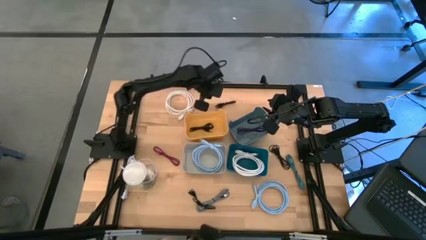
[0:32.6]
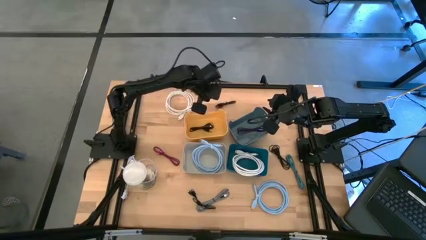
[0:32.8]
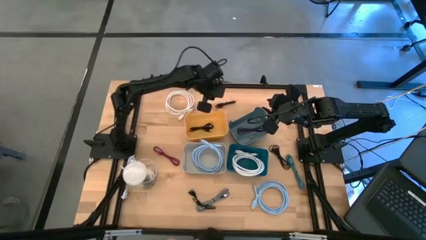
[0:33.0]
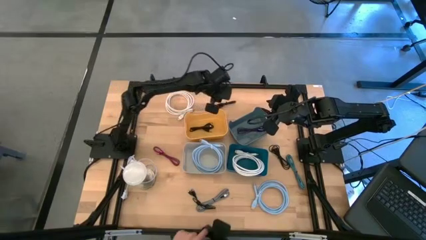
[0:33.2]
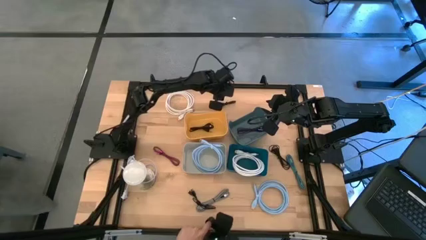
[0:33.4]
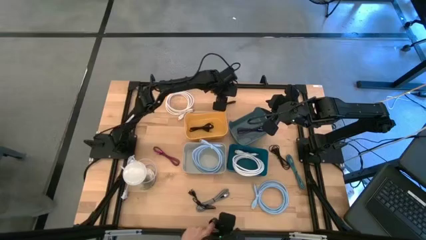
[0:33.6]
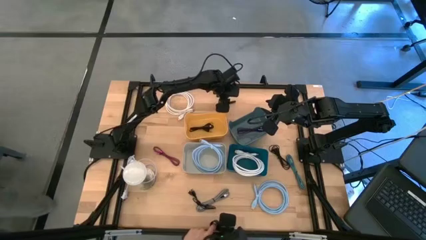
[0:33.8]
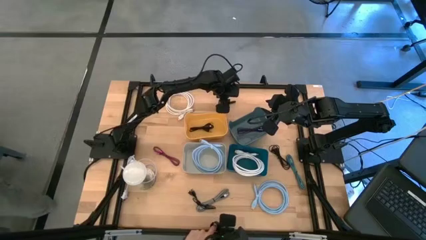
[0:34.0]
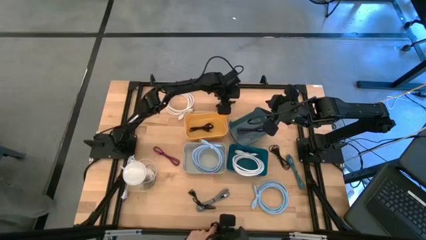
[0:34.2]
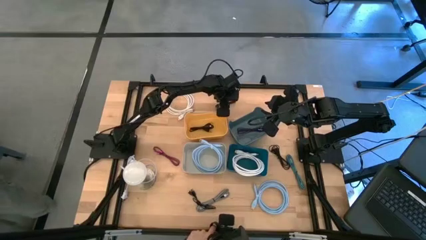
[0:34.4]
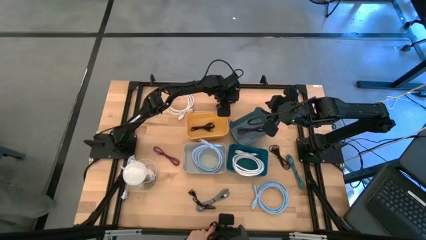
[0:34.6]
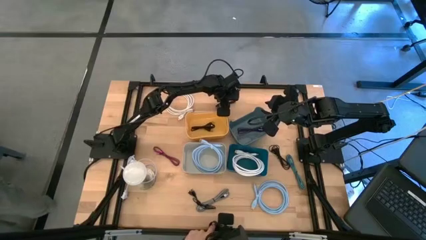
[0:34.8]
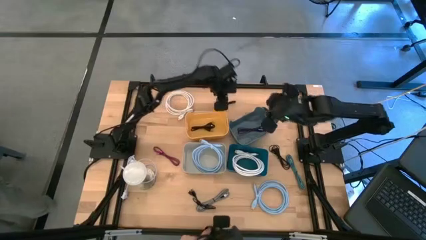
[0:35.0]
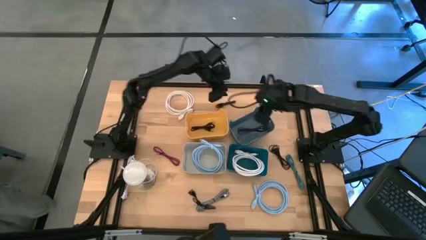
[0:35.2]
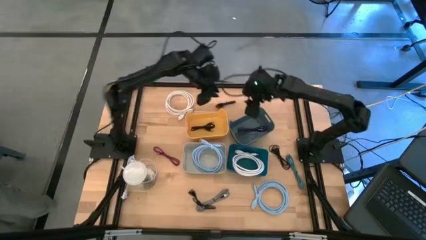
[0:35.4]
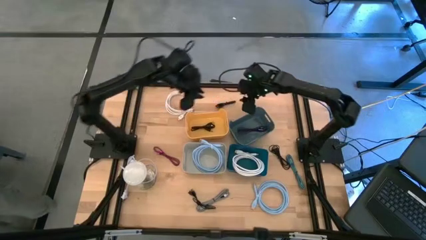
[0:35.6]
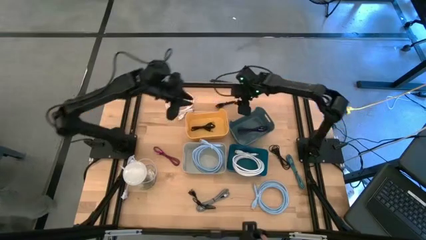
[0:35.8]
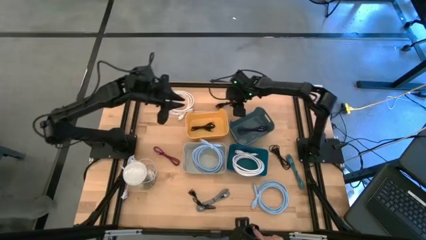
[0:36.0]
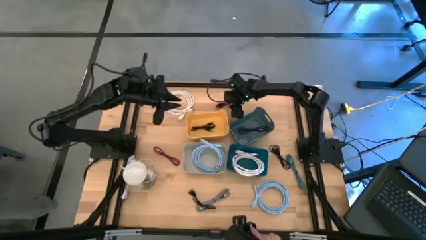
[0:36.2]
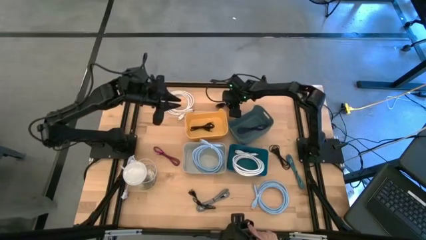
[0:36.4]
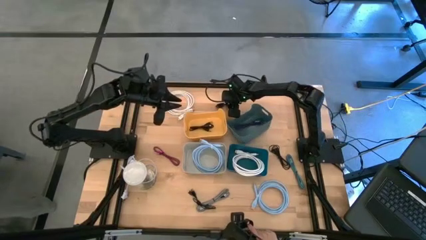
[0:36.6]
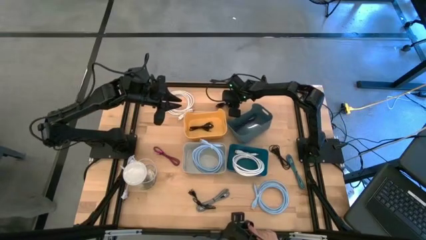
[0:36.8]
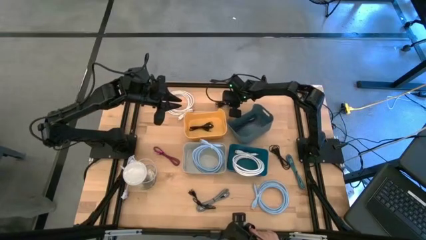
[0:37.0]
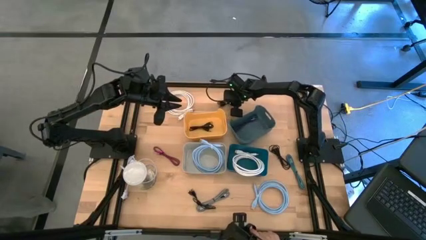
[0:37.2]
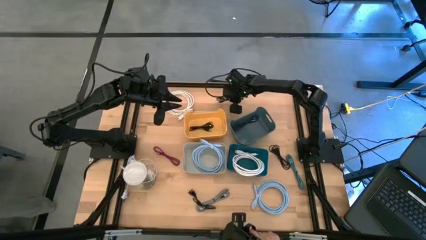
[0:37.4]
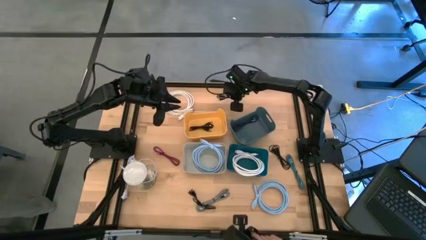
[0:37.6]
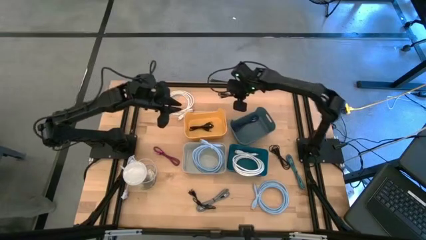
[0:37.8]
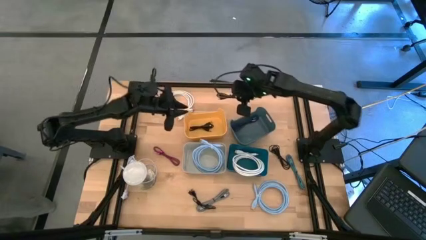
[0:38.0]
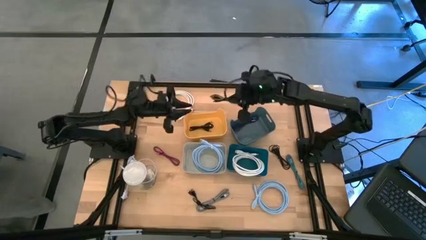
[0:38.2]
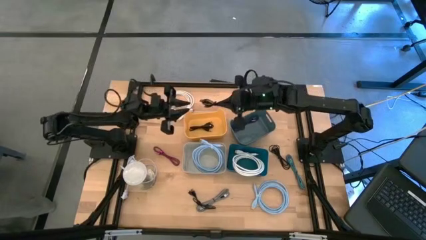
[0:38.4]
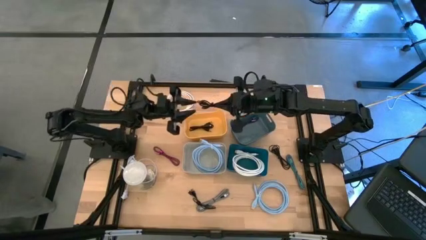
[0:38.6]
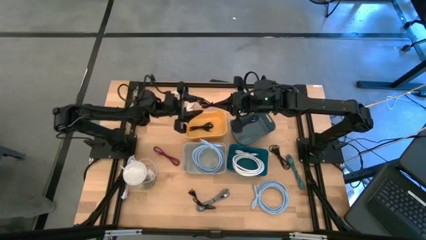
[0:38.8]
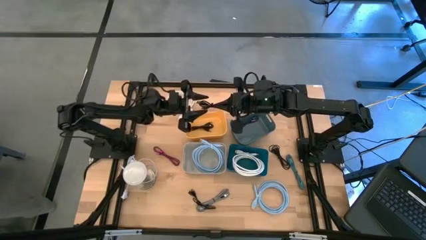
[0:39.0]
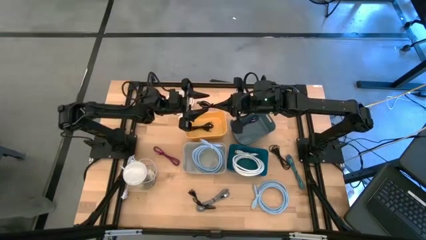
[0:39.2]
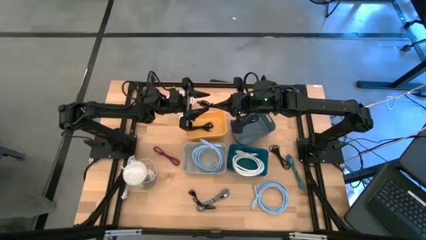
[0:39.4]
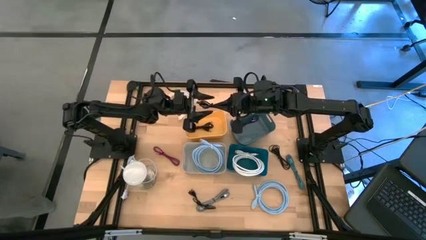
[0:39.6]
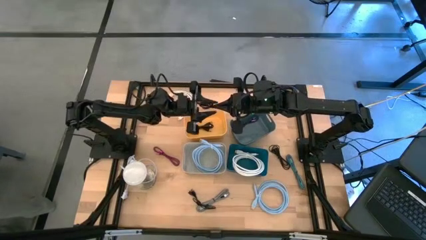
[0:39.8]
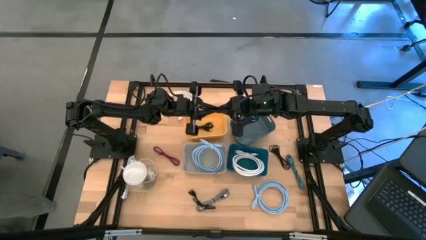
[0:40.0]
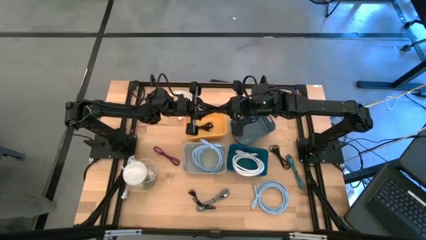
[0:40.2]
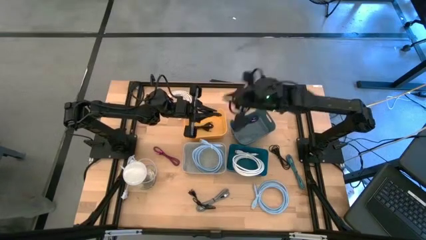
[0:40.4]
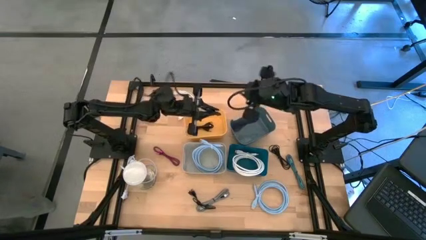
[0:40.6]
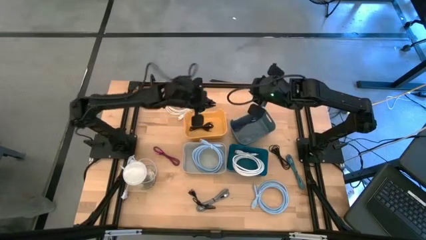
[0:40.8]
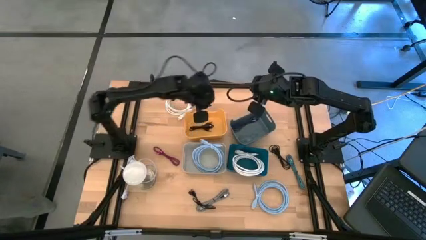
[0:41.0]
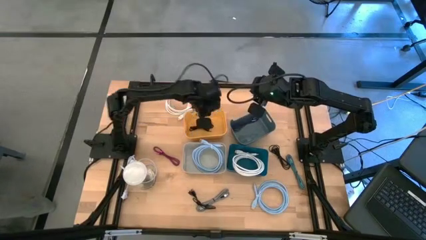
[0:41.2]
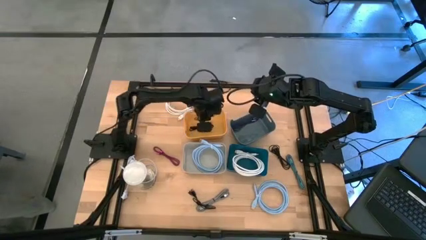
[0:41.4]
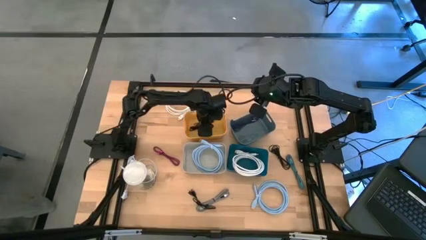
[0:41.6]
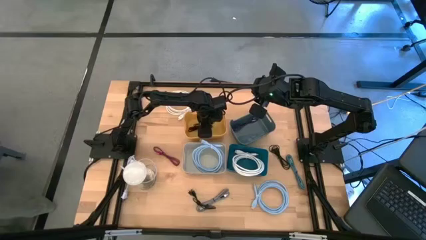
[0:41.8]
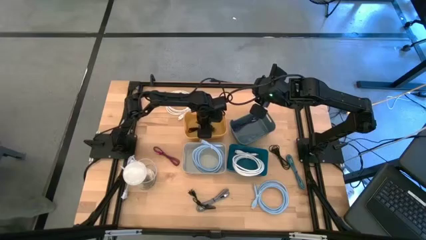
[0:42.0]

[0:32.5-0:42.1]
Task: Pick & Place USB Port
Put the black USB cable into the yellow bin

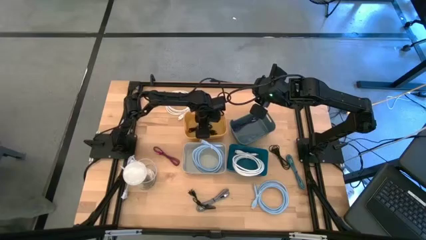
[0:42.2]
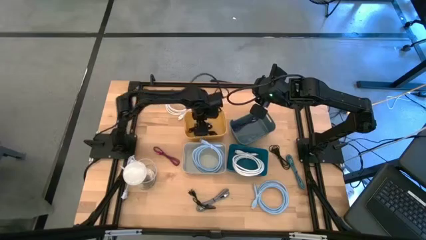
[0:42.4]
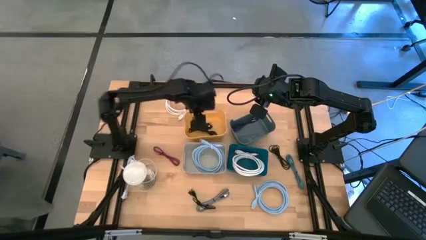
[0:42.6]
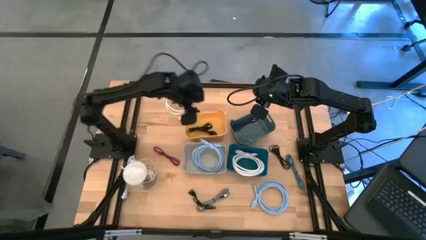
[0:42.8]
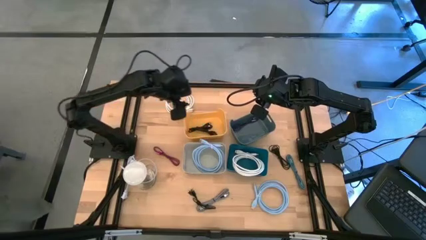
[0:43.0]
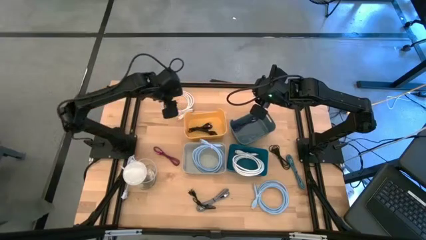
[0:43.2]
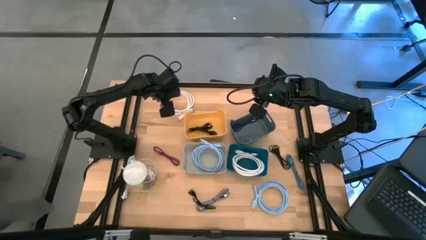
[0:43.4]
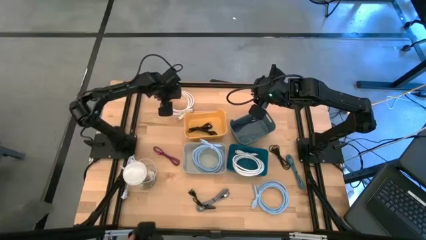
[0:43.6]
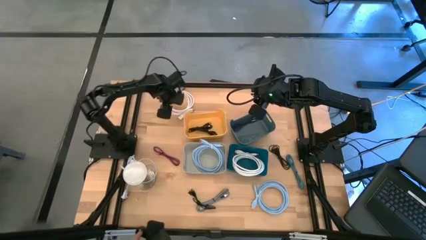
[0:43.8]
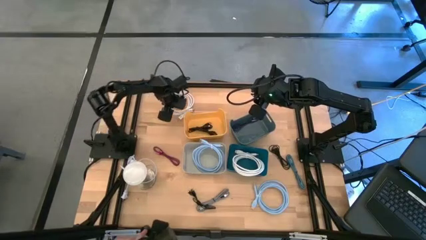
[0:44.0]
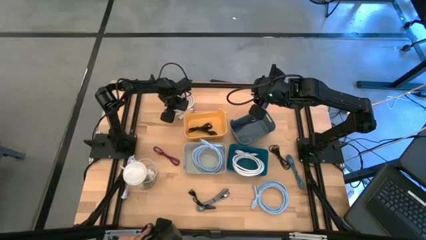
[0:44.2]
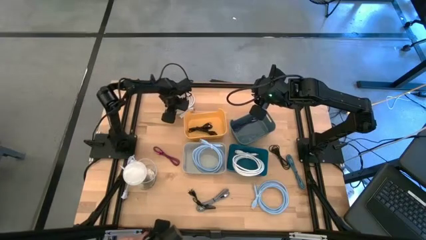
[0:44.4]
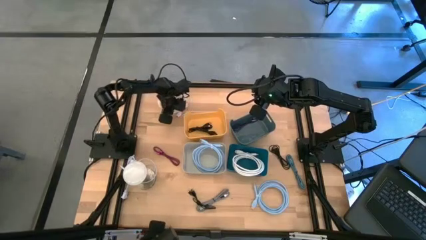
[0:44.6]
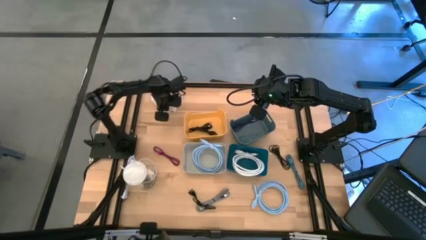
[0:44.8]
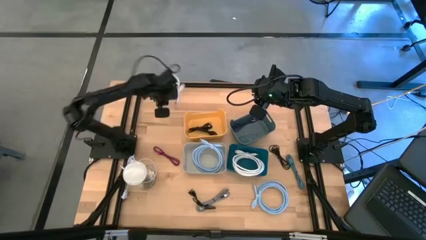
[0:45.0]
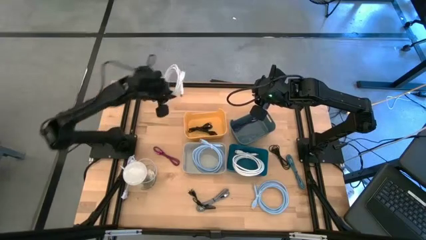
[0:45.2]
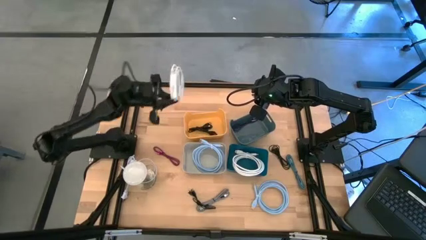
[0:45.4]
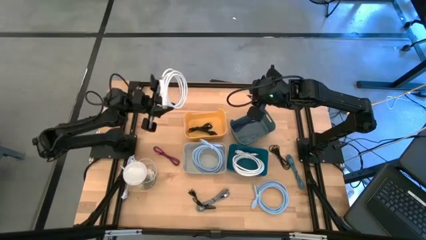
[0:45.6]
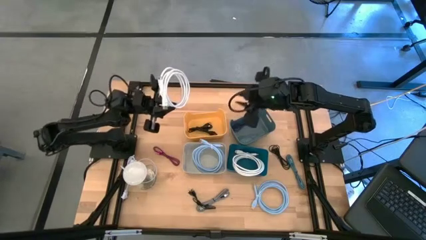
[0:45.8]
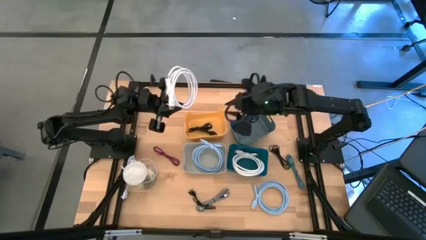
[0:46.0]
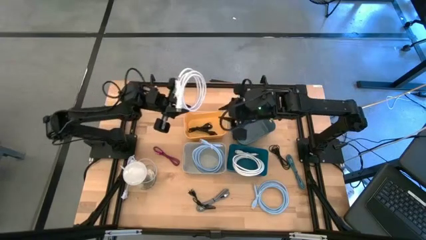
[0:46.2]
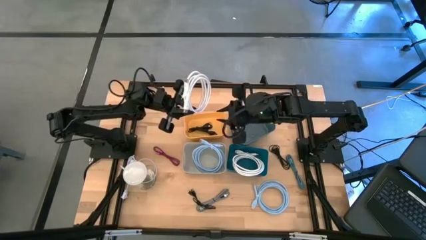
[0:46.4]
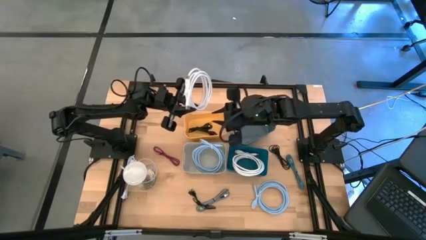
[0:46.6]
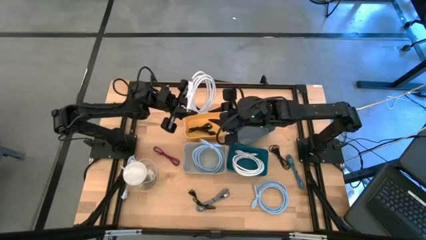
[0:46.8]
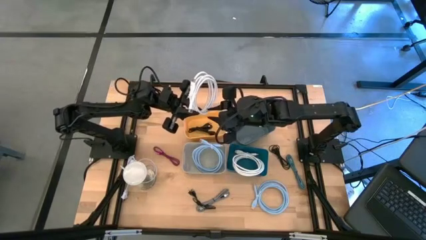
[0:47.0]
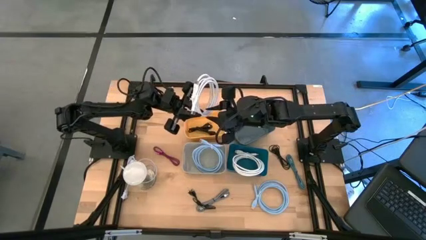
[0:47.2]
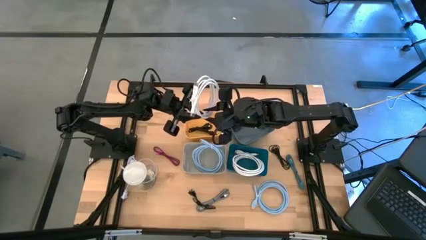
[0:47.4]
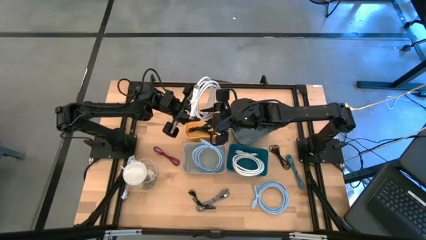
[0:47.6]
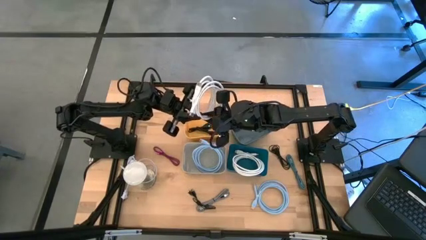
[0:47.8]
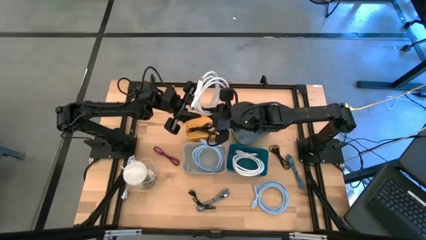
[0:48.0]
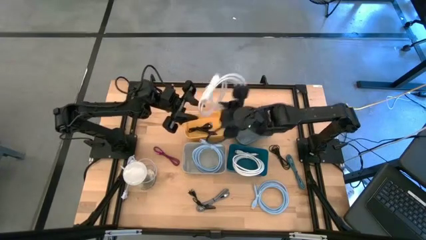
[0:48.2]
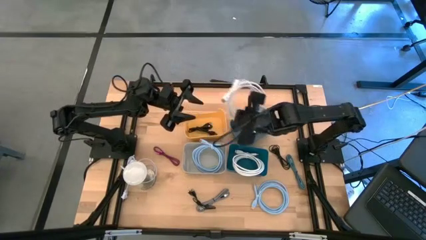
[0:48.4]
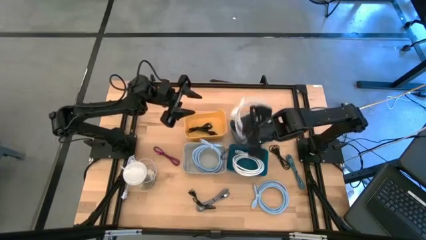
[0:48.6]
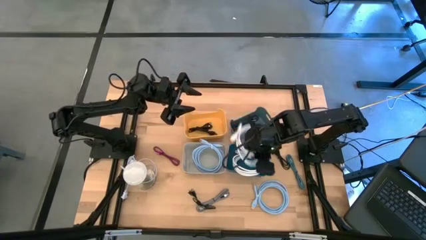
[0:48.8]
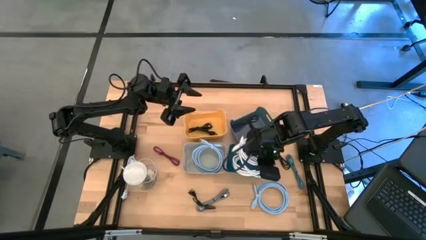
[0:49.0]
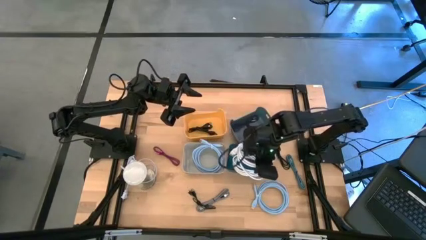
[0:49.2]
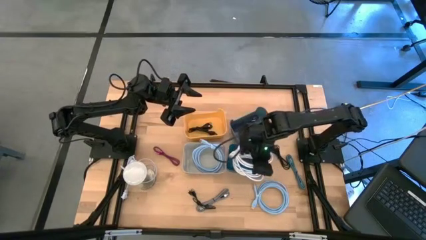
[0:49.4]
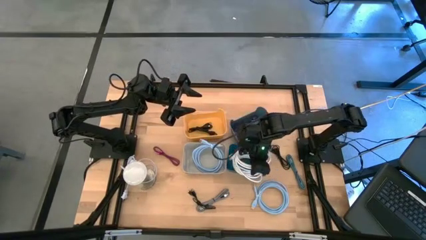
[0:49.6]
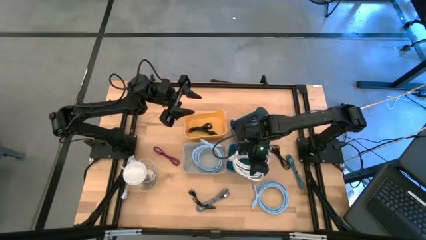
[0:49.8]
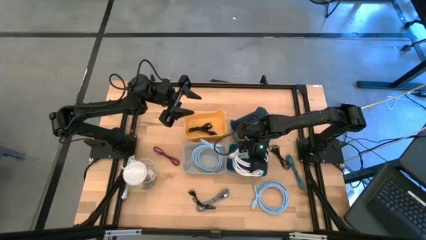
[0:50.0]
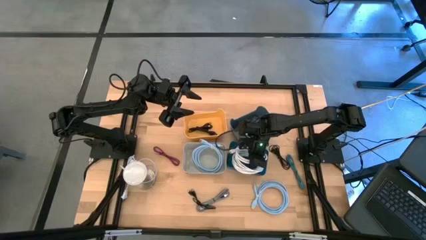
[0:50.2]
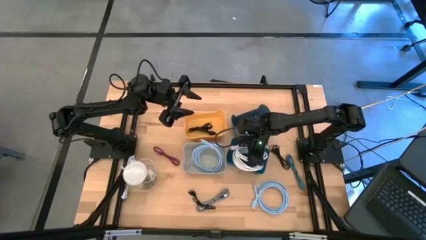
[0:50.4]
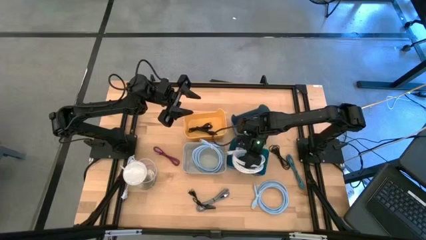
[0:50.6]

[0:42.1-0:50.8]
Put the white USB cable into the blue bin
